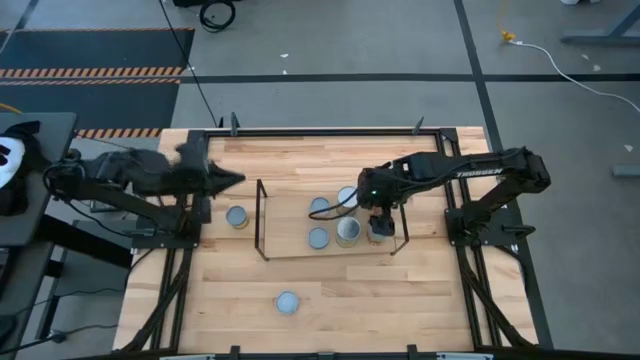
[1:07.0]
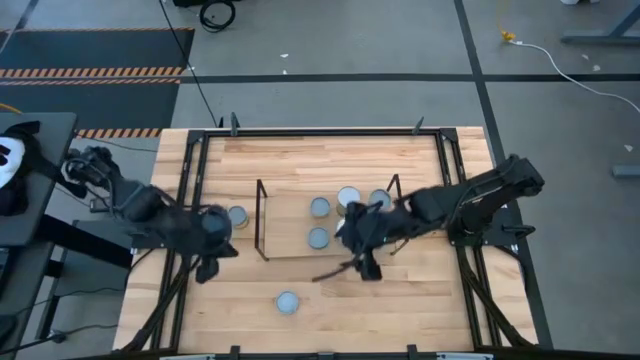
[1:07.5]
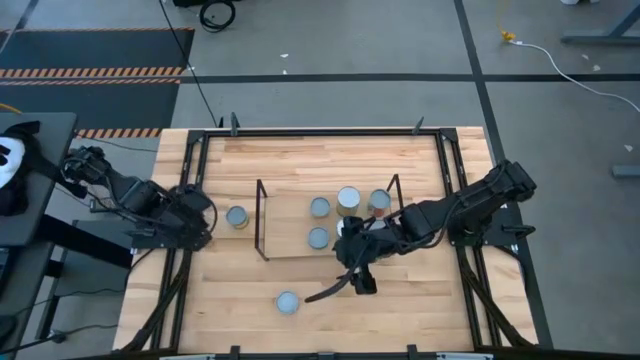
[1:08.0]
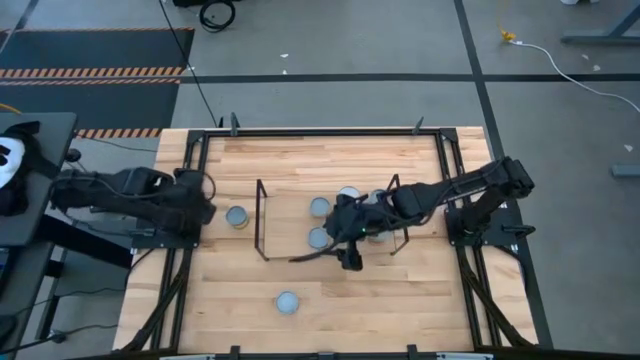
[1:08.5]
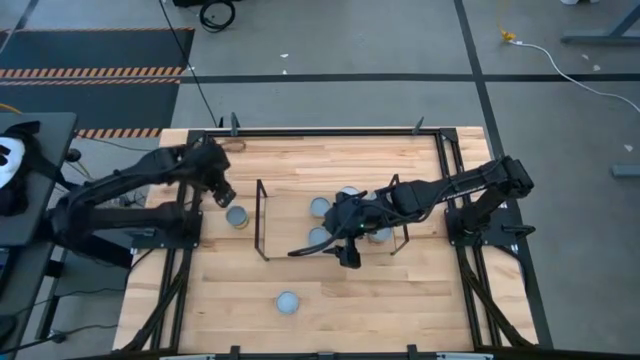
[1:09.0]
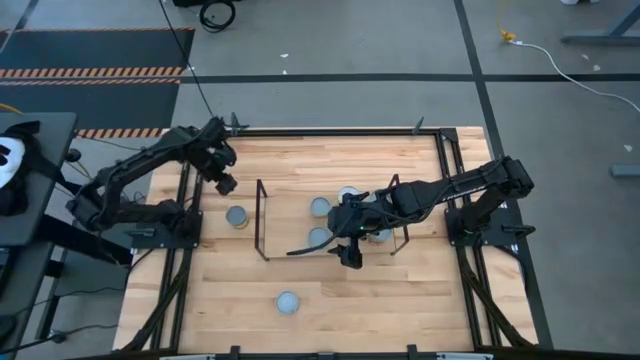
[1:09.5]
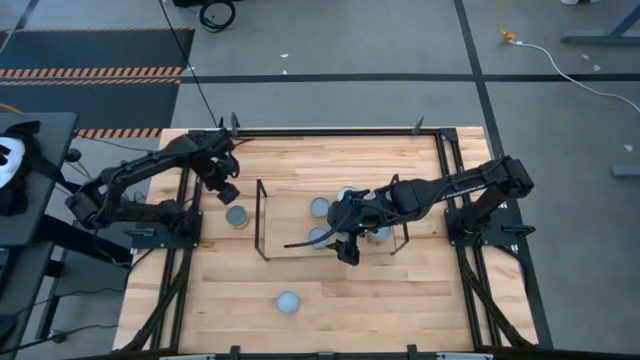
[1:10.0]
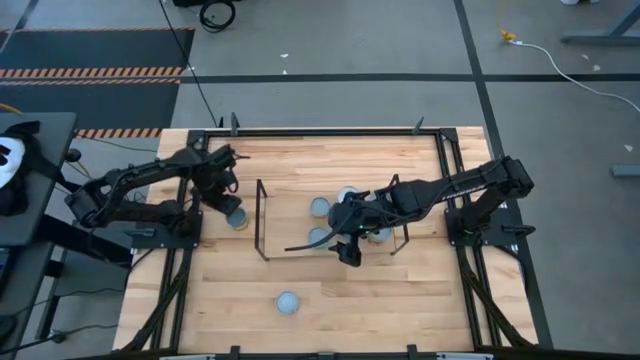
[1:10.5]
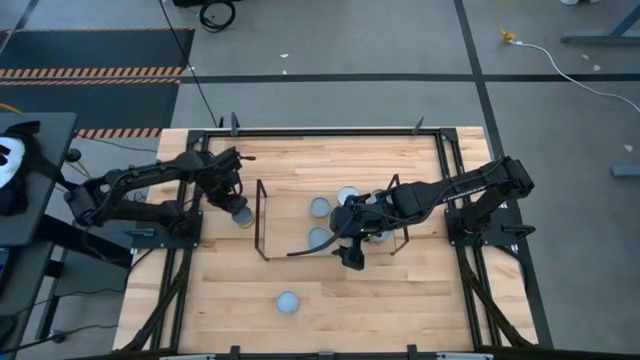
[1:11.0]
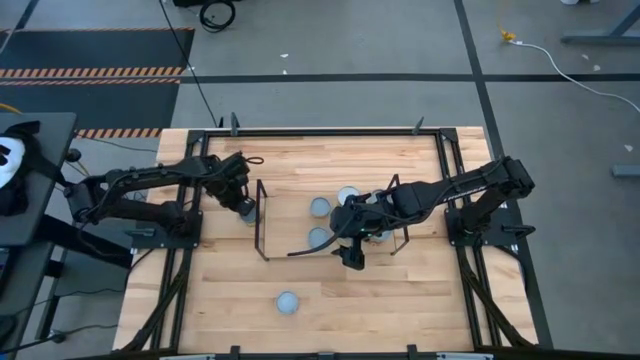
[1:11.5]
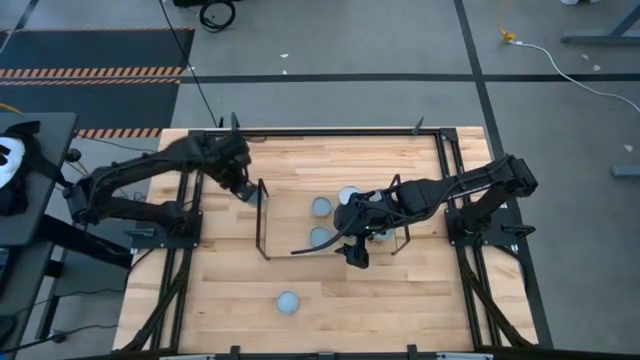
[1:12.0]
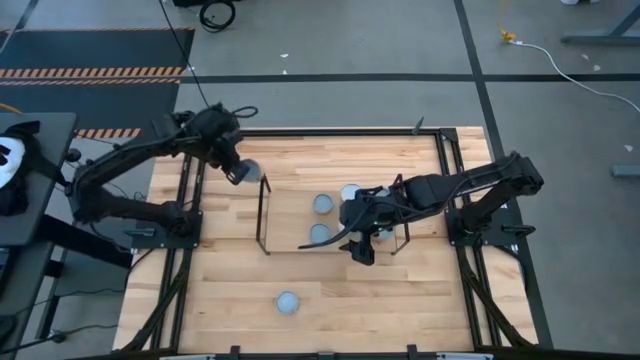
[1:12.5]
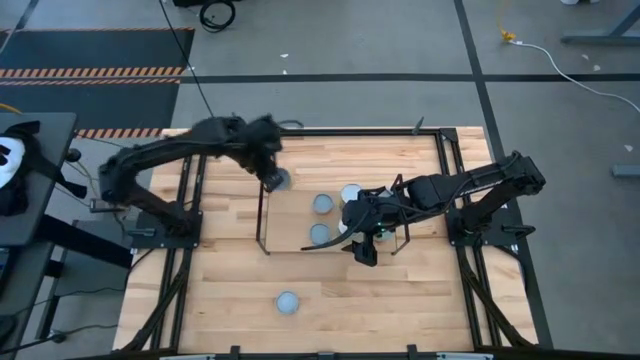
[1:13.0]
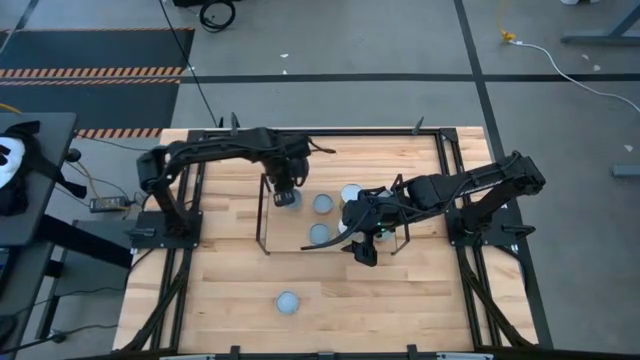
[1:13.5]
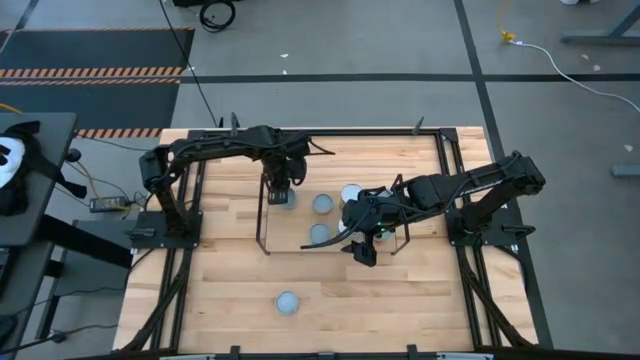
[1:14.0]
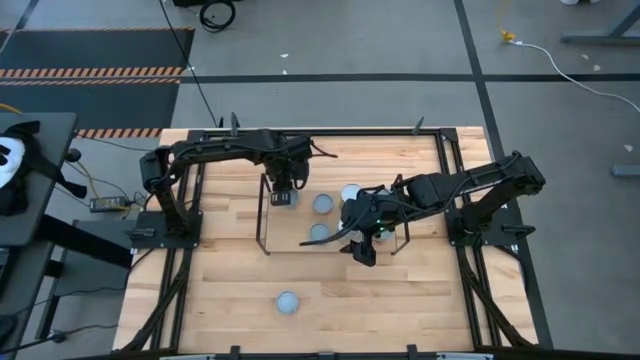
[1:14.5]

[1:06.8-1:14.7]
Task: Pick and place cans onto a shelf
Put the canned peaches on the shelf

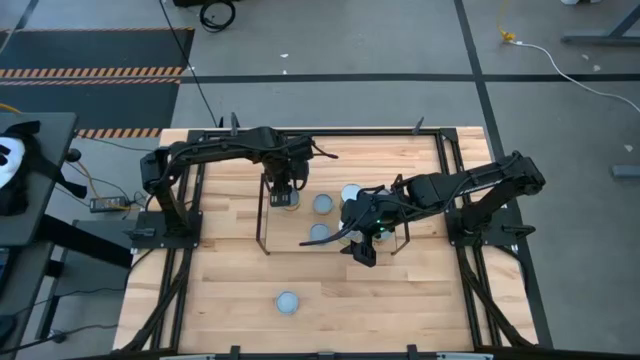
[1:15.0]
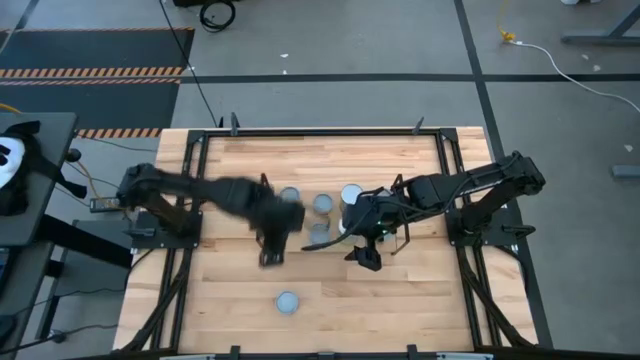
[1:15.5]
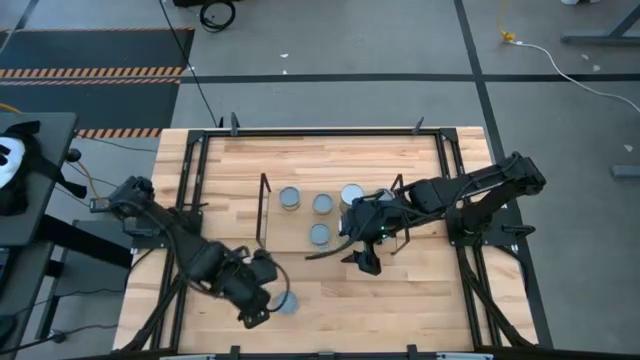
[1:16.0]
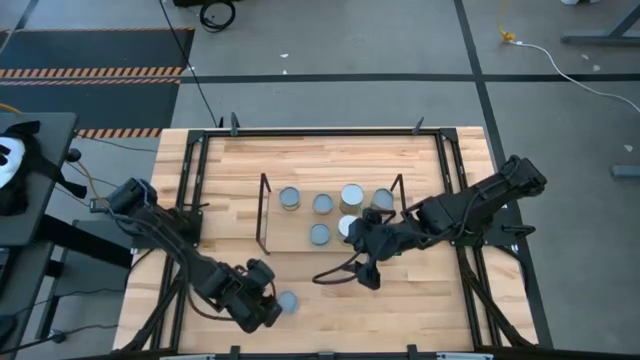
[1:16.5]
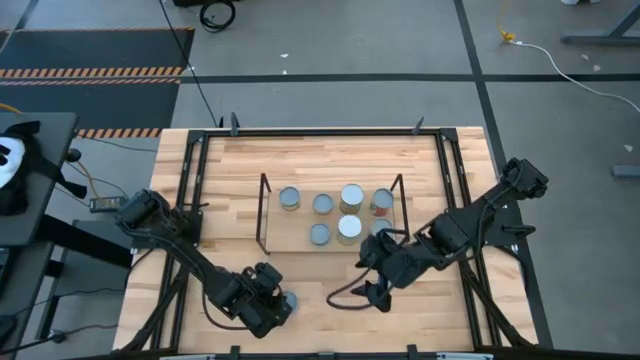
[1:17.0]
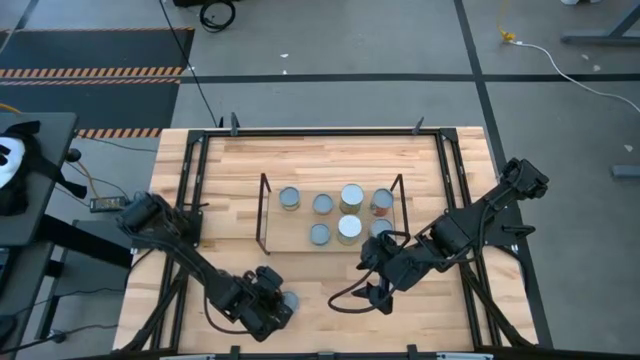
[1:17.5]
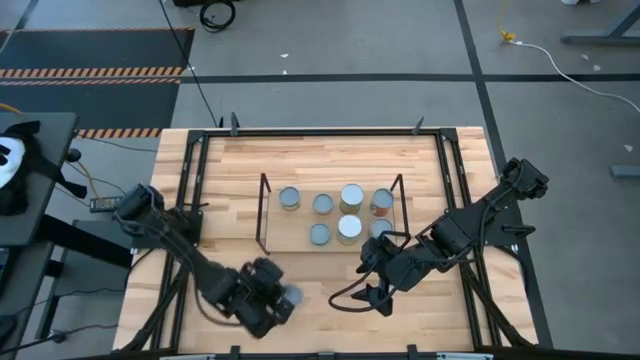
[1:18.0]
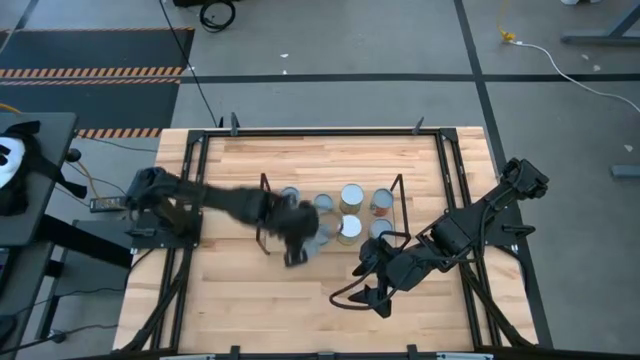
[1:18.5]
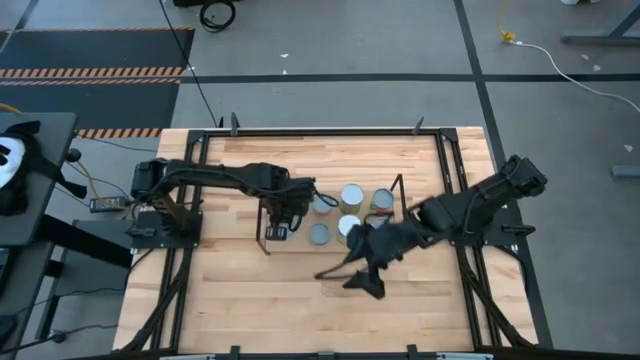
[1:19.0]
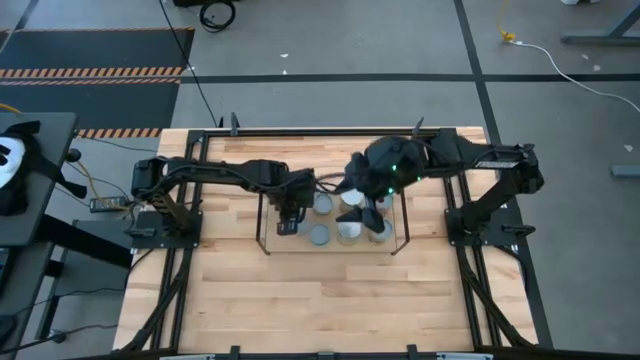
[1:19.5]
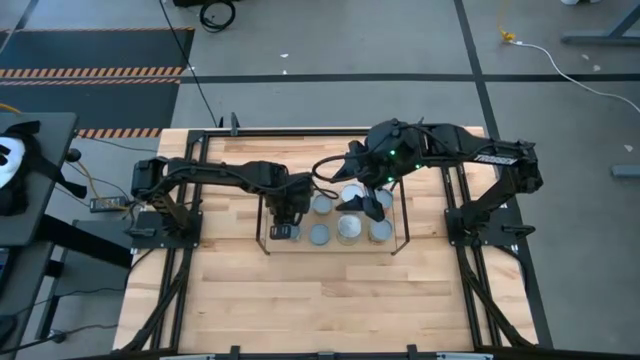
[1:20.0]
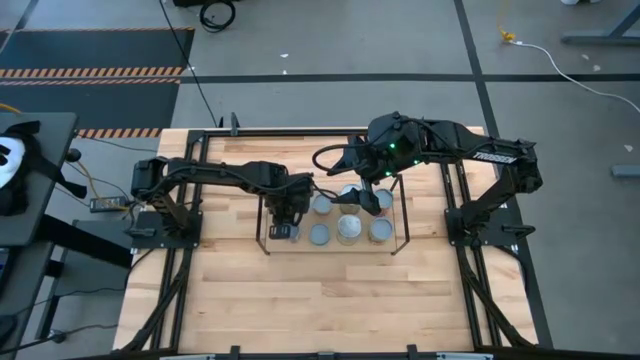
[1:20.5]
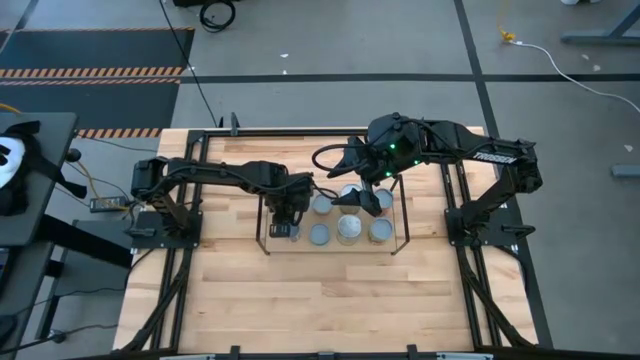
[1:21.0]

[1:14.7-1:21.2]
Put the canned tomatoes on the shelf

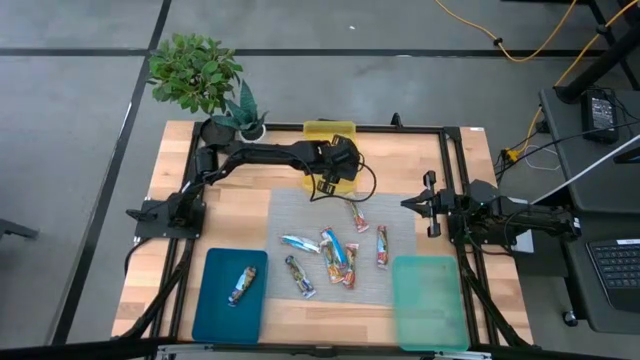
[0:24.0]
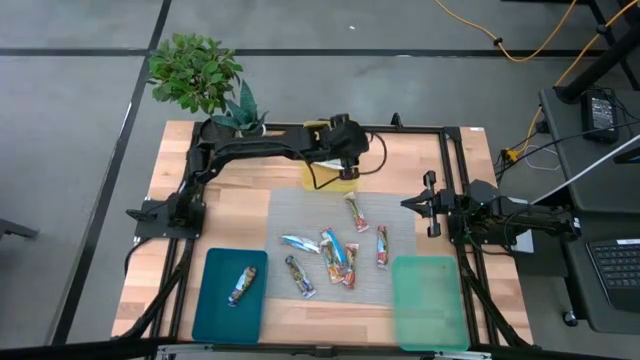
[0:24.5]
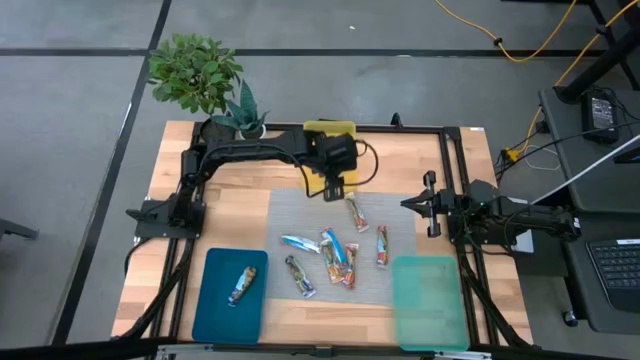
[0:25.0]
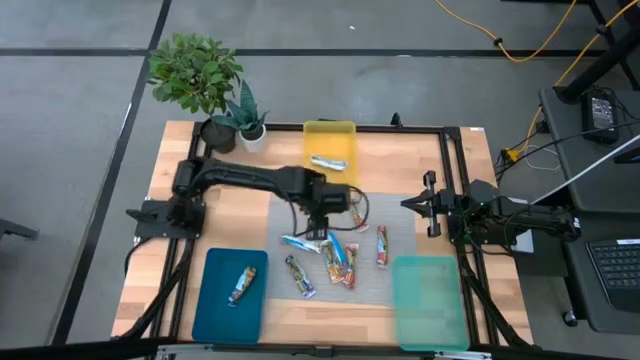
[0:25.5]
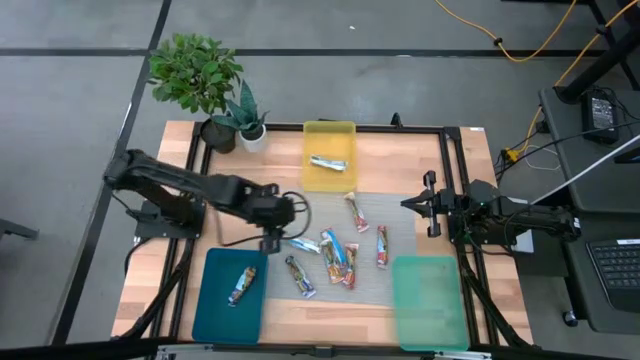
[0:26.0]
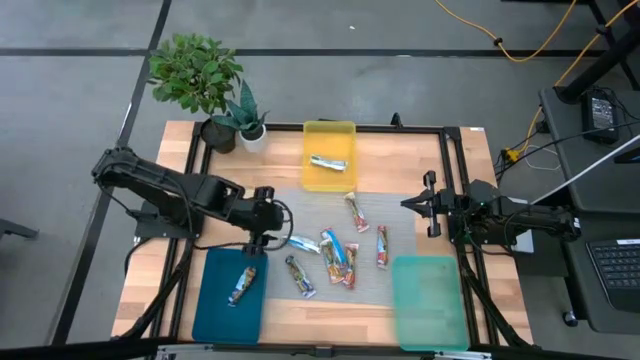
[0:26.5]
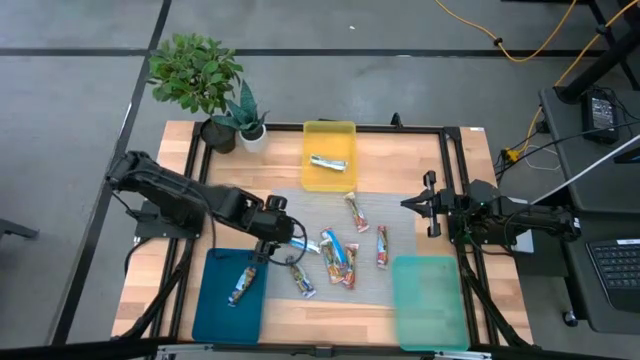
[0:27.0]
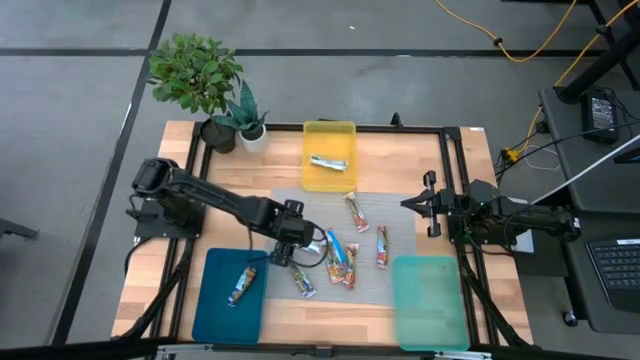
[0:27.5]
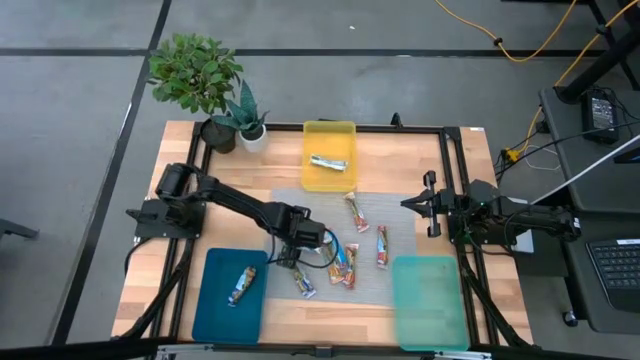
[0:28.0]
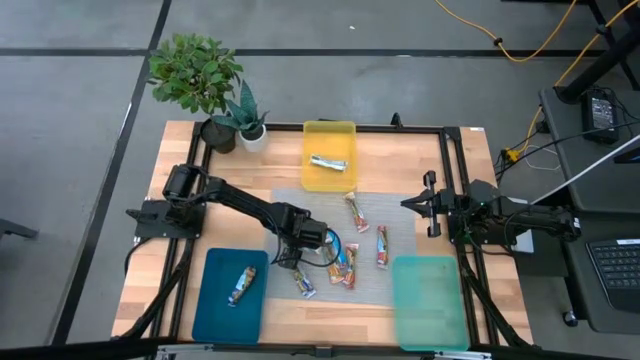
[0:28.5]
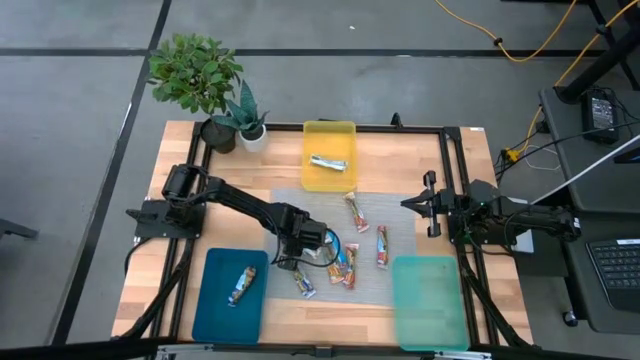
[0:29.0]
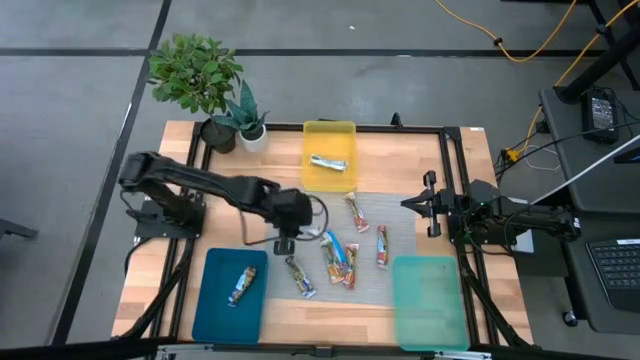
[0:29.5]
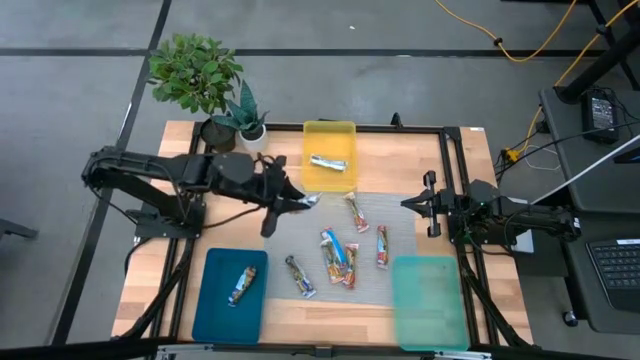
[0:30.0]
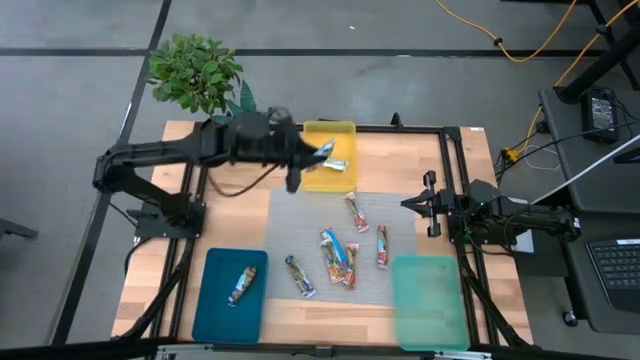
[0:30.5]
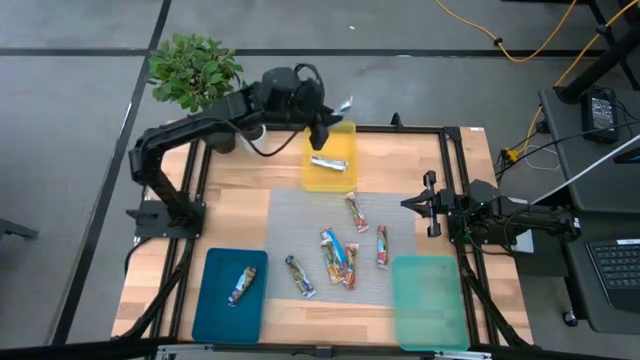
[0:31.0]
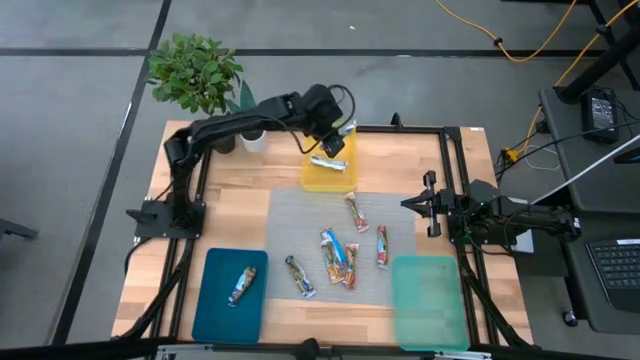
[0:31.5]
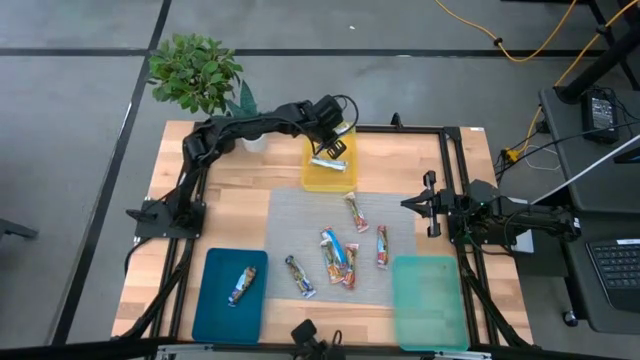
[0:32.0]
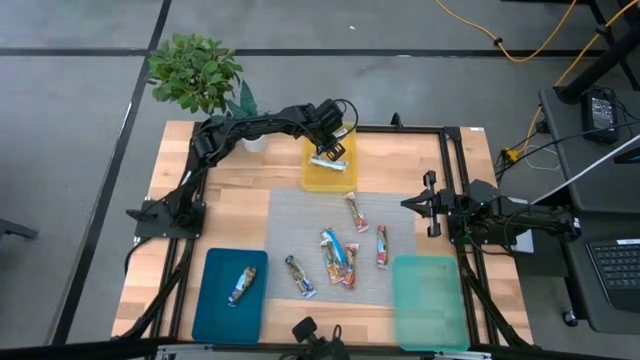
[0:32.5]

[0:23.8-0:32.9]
Task: Pick and place Granola Bars by type
Put the left yellow granola bar into the yellow bin
